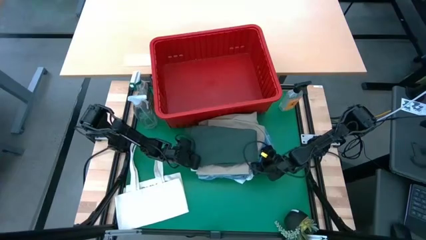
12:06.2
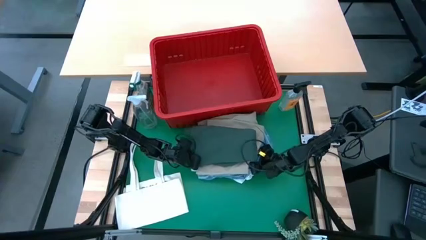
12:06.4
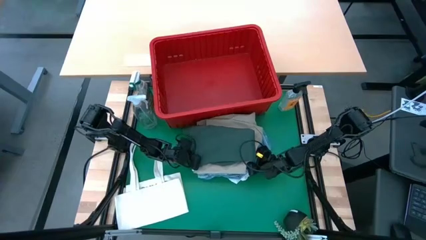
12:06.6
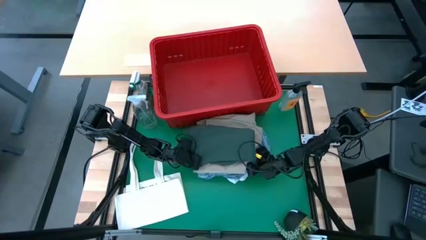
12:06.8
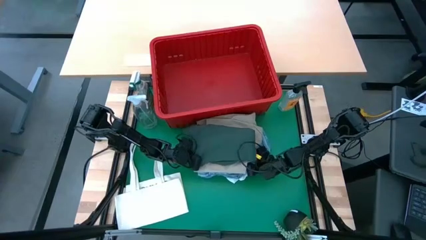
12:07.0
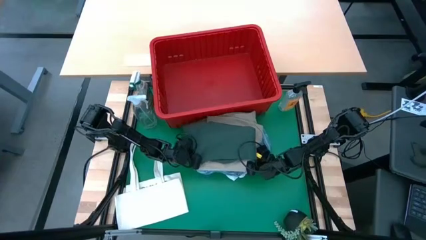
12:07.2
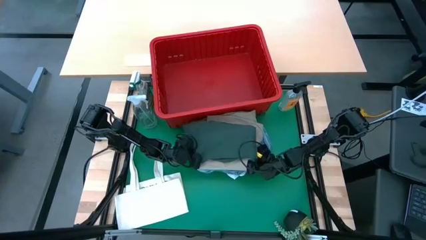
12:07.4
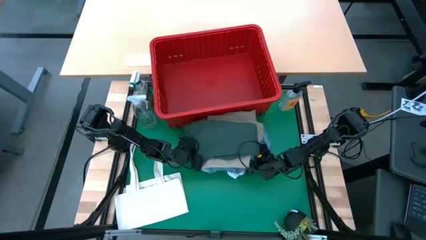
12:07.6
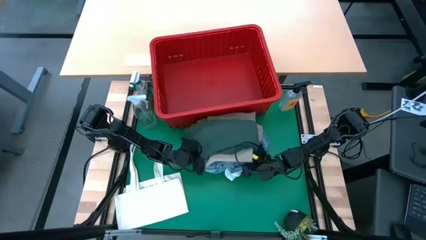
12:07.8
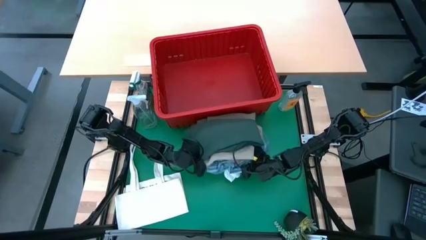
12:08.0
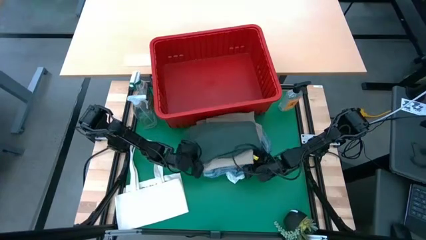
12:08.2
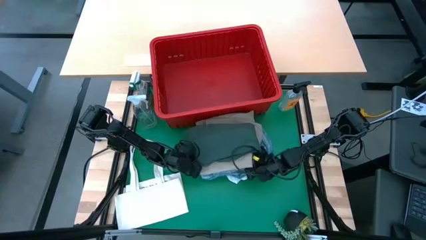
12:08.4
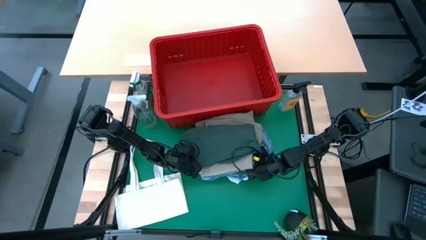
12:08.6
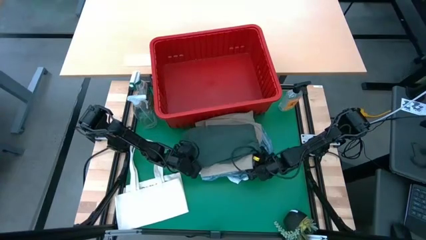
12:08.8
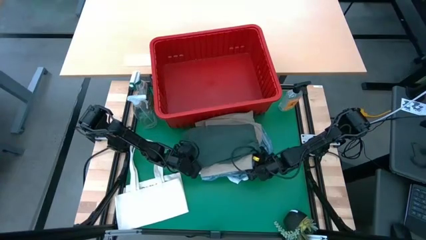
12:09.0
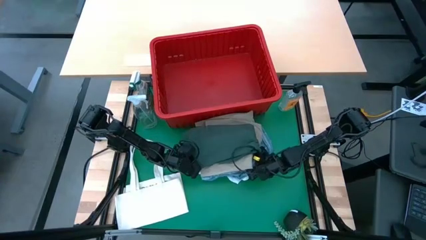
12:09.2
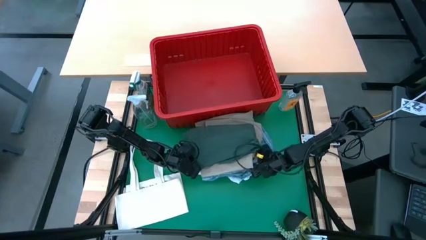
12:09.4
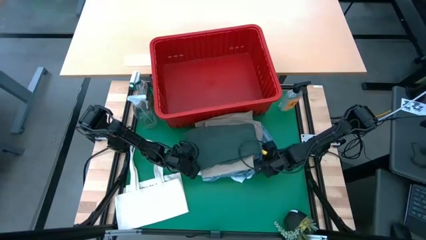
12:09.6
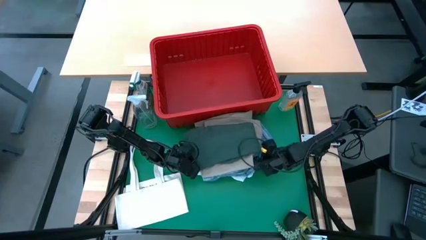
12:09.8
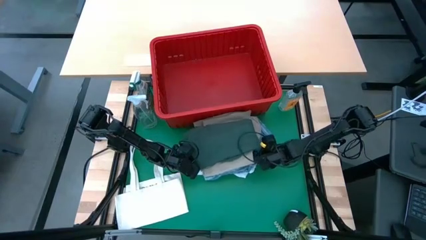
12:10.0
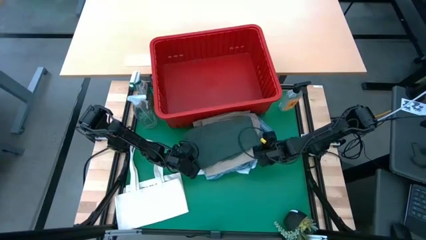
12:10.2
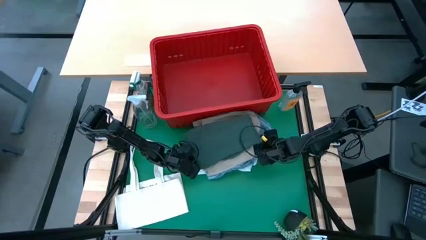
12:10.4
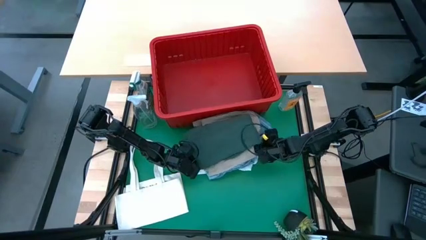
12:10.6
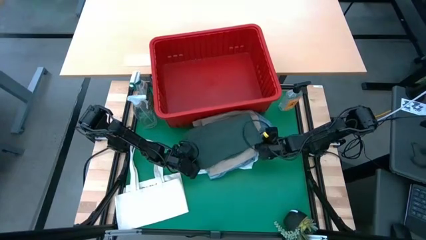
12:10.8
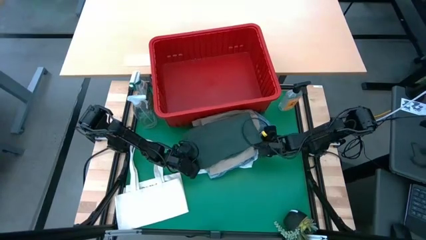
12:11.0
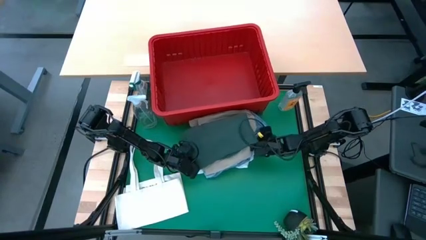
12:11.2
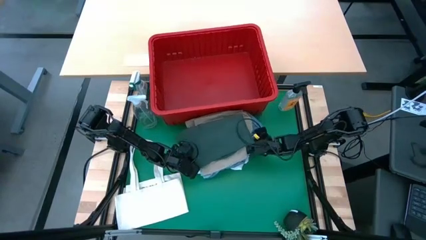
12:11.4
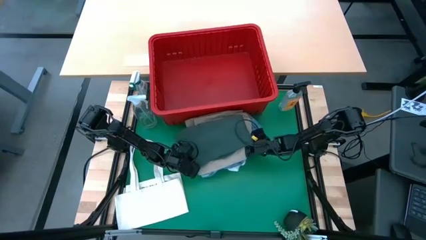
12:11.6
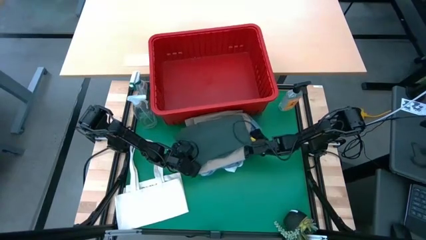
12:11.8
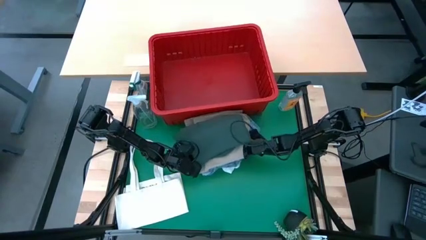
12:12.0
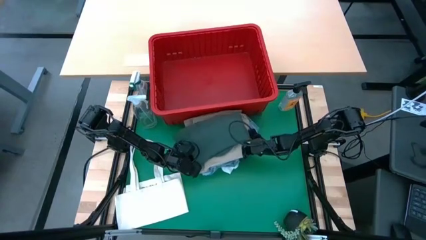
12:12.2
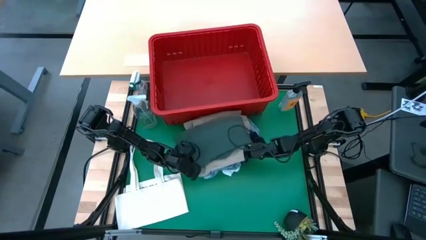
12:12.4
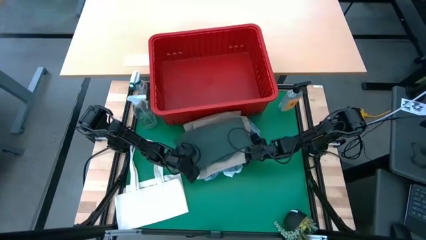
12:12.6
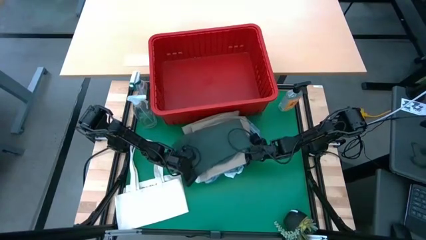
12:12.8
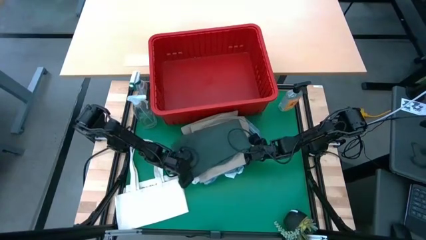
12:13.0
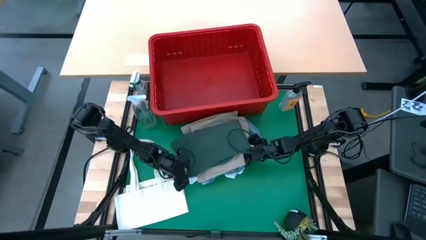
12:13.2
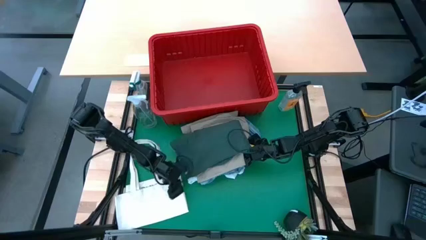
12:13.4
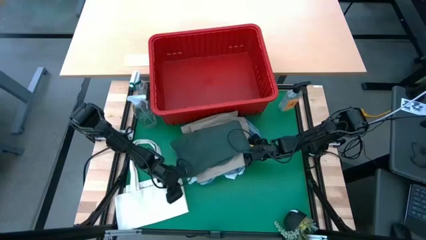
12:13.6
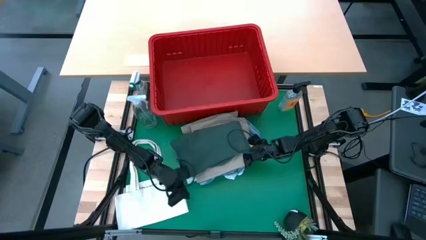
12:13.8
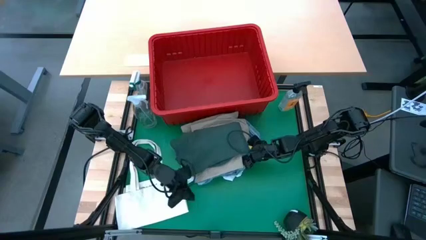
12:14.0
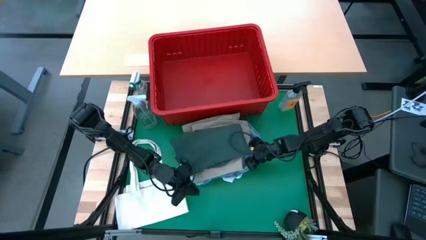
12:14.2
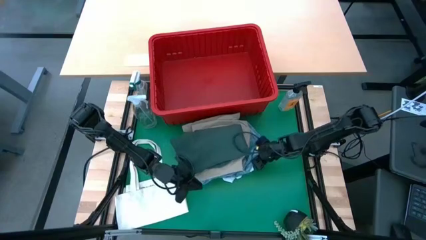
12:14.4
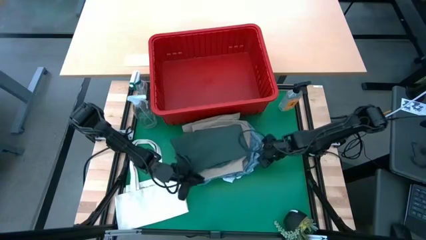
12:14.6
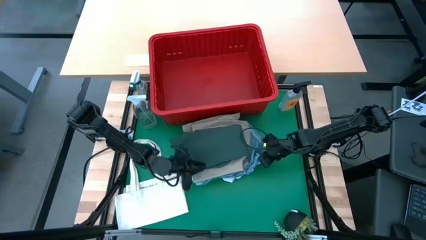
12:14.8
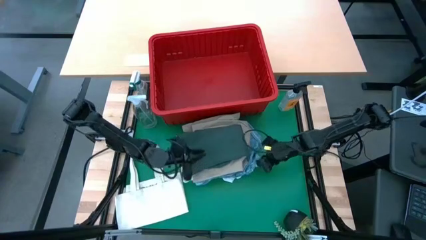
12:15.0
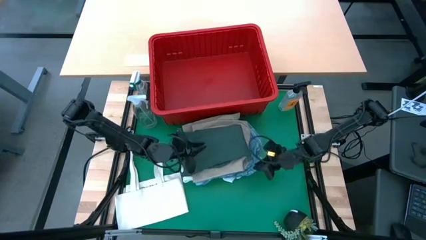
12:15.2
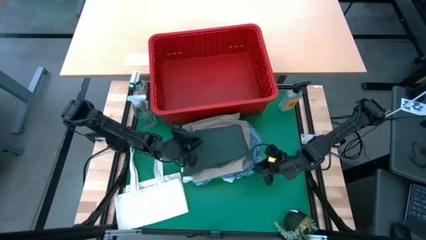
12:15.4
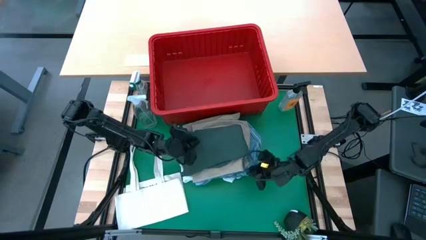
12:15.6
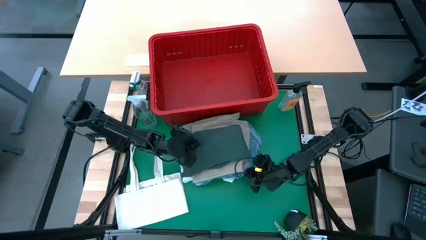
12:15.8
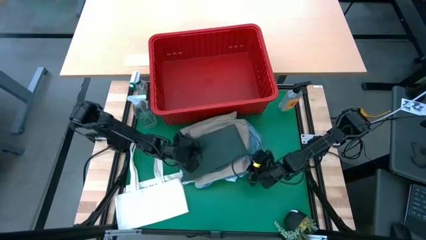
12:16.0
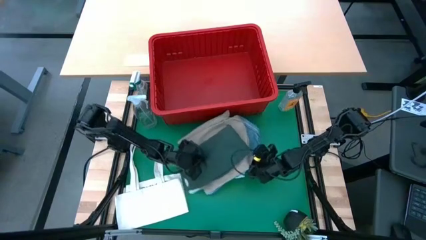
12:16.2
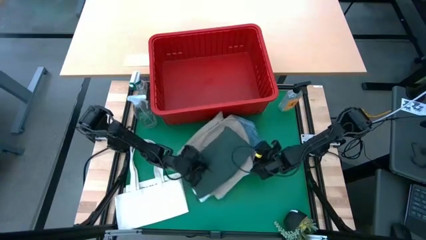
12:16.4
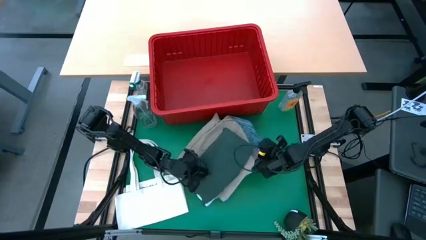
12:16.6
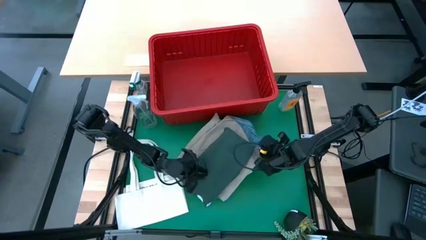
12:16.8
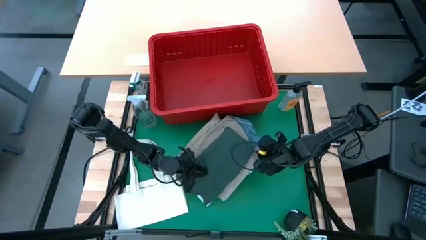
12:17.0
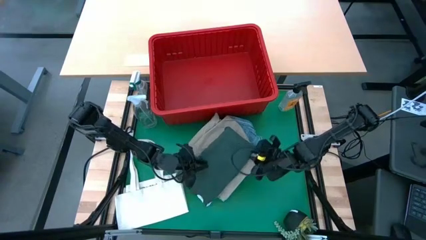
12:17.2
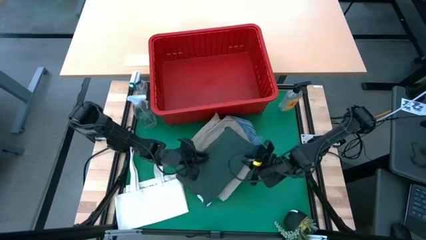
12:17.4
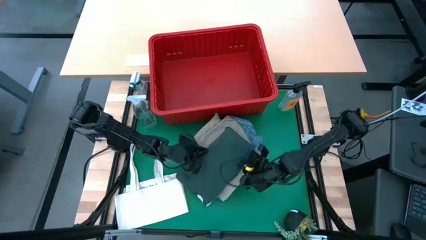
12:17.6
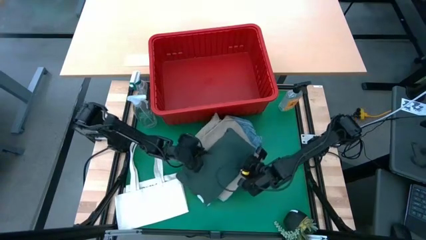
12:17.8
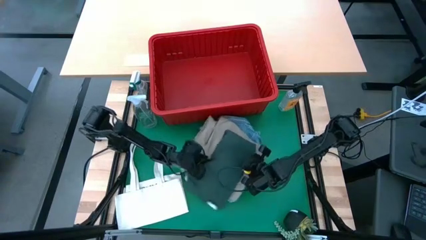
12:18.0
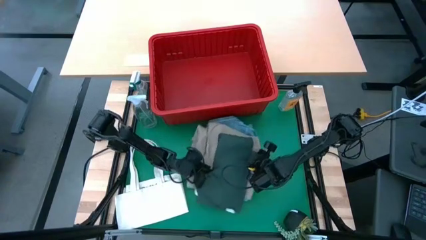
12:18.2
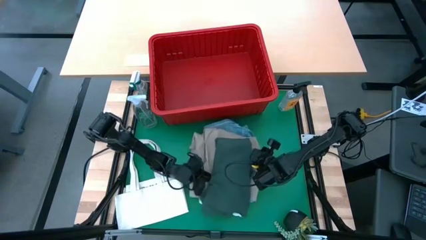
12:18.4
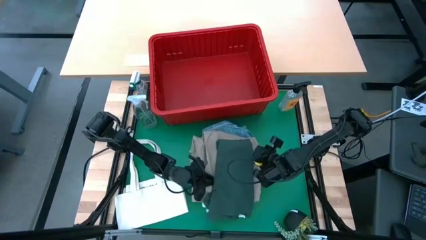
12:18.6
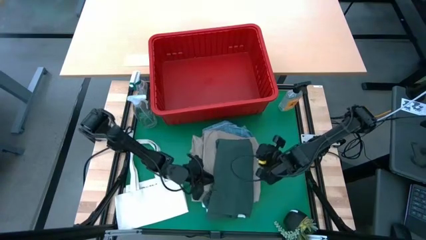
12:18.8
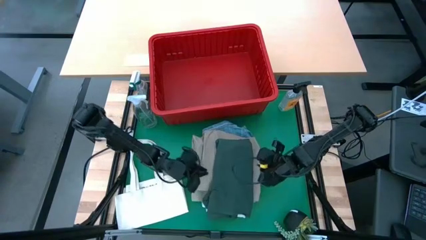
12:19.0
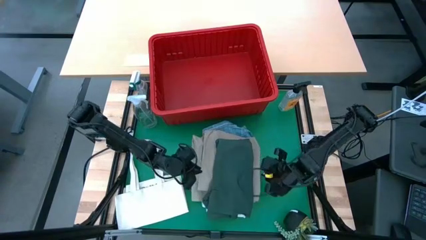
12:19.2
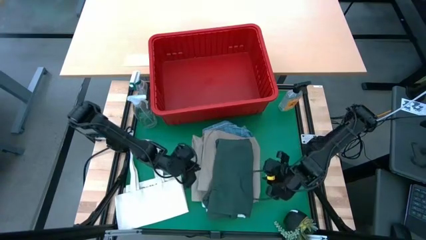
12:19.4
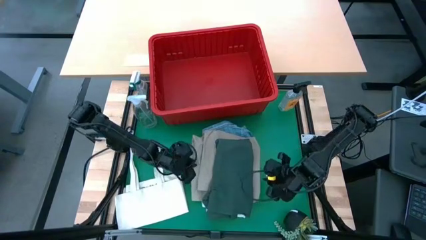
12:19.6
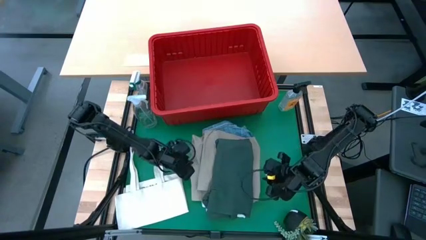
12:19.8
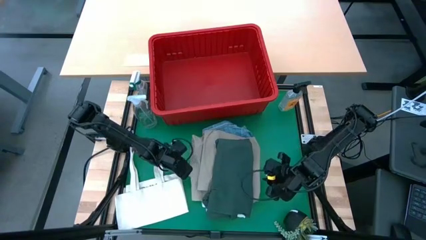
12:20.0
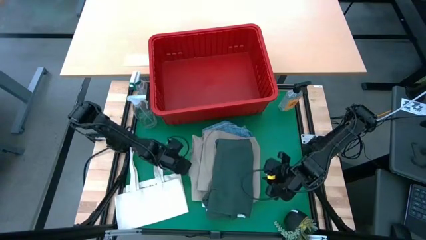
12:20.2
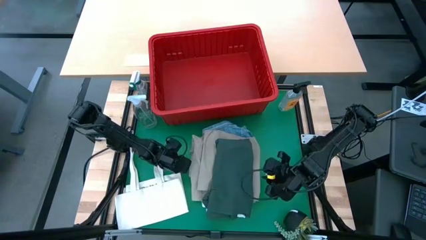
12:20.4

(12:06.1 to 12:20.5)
Task: Fold Laundry from Bin
Put the stack of folded clothes into the red bin
